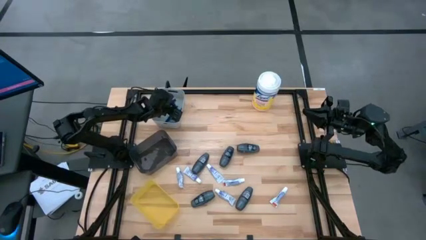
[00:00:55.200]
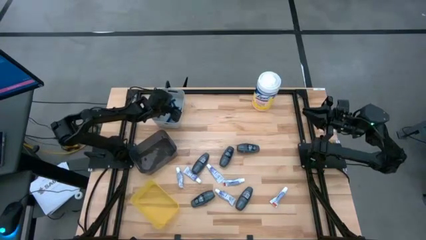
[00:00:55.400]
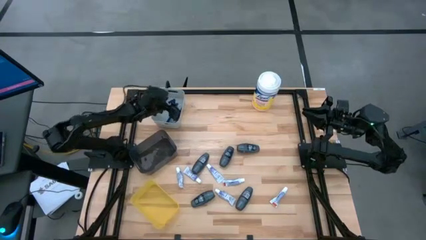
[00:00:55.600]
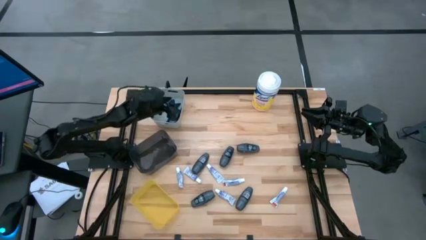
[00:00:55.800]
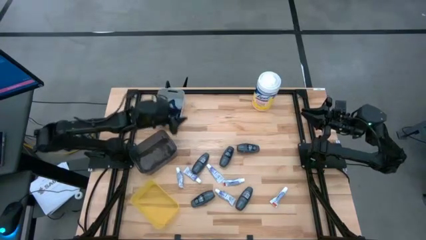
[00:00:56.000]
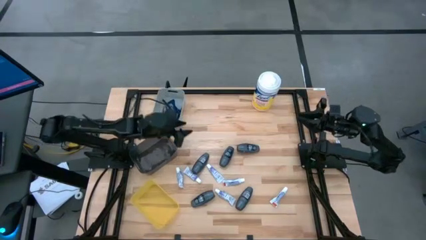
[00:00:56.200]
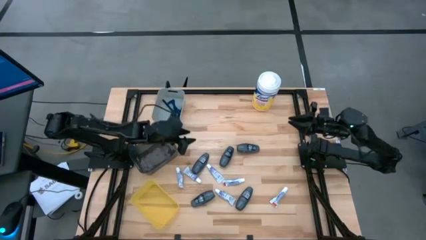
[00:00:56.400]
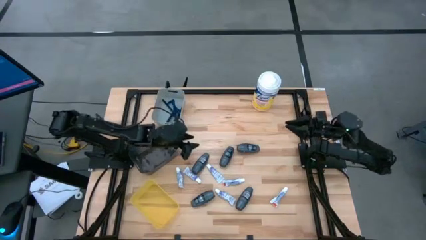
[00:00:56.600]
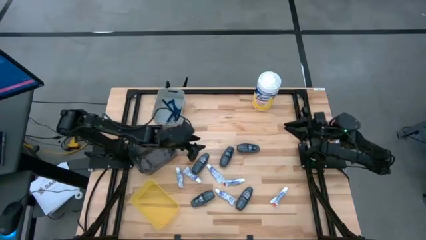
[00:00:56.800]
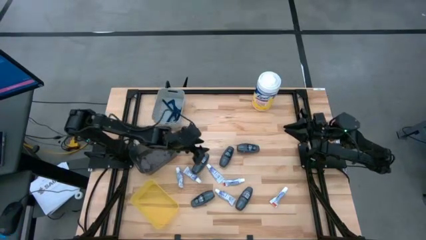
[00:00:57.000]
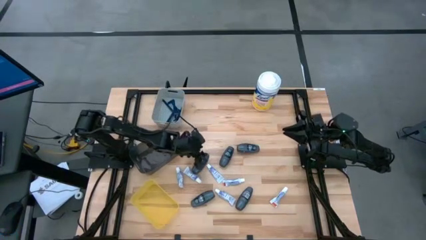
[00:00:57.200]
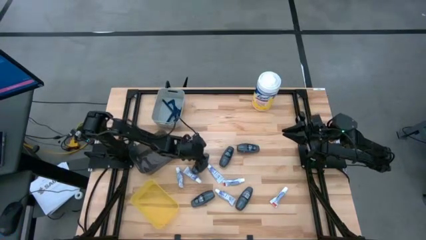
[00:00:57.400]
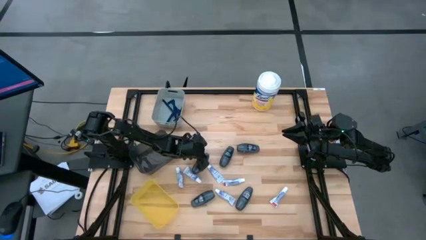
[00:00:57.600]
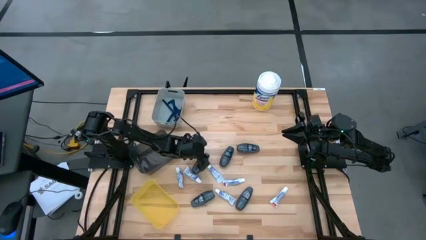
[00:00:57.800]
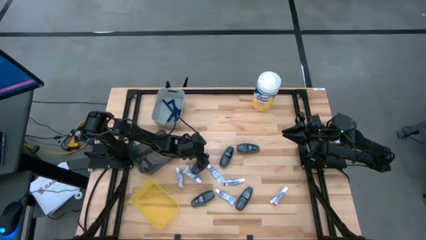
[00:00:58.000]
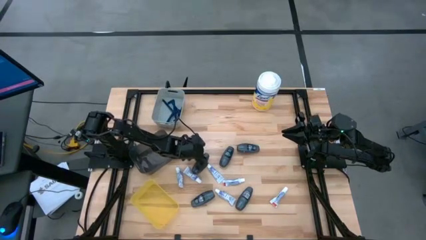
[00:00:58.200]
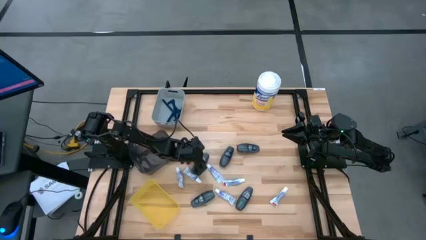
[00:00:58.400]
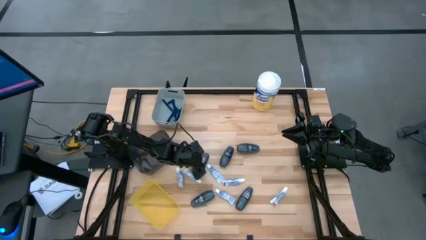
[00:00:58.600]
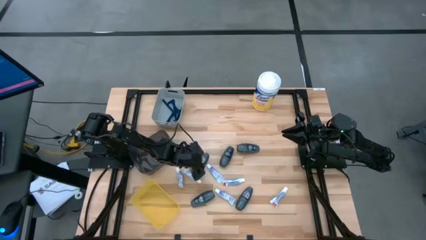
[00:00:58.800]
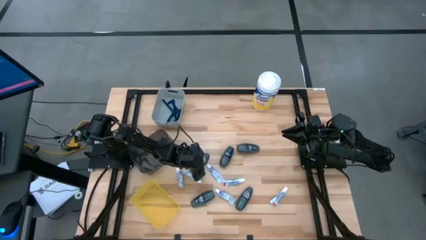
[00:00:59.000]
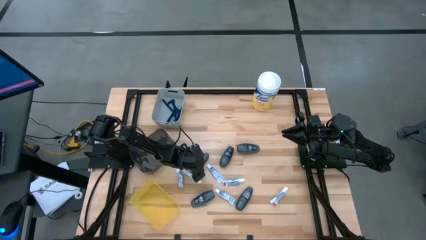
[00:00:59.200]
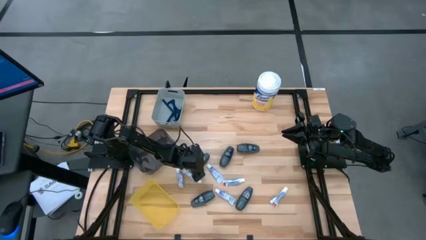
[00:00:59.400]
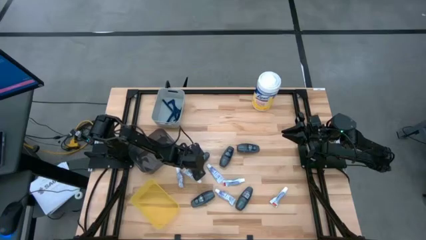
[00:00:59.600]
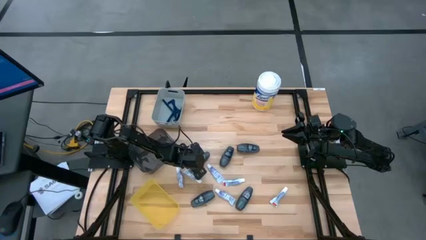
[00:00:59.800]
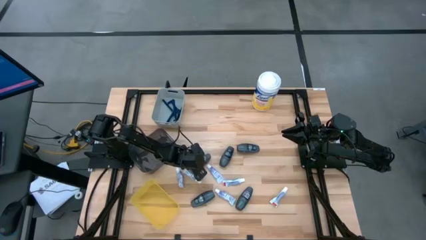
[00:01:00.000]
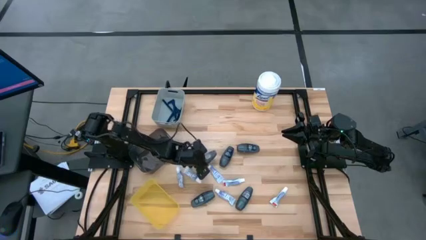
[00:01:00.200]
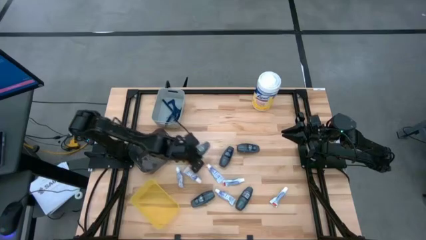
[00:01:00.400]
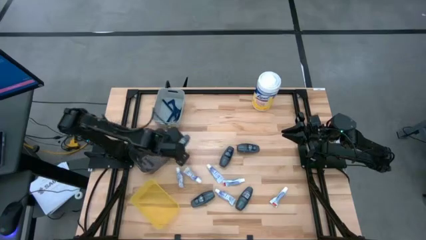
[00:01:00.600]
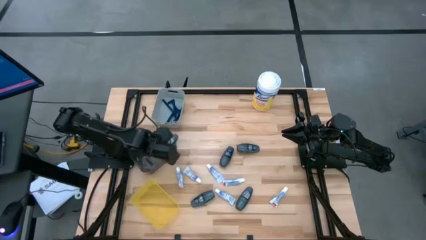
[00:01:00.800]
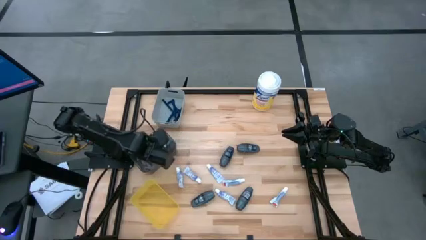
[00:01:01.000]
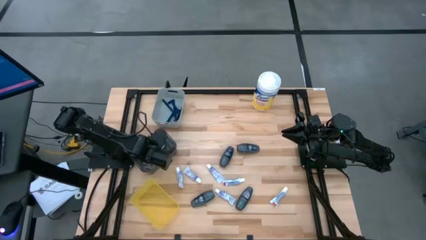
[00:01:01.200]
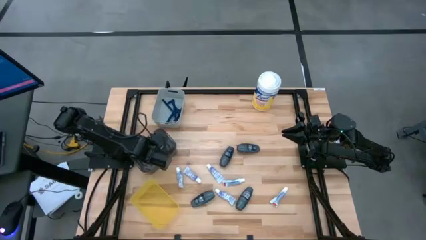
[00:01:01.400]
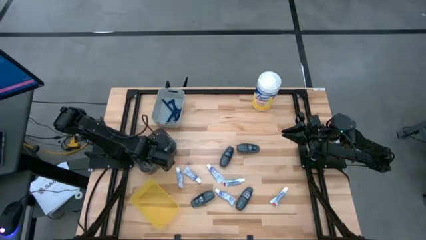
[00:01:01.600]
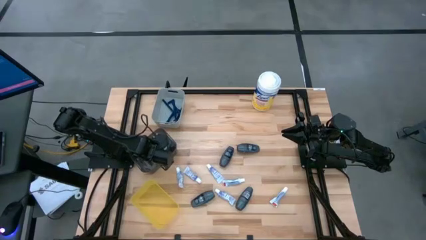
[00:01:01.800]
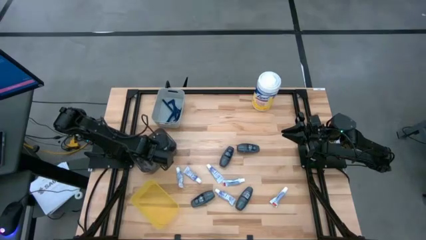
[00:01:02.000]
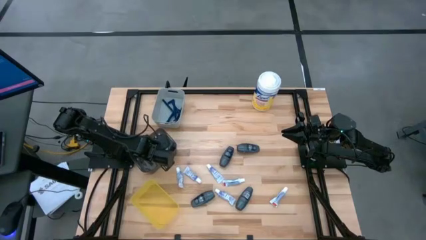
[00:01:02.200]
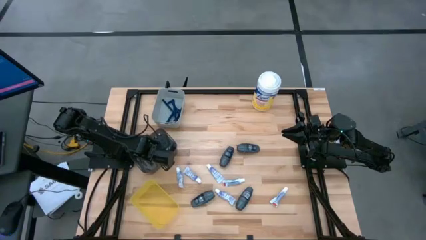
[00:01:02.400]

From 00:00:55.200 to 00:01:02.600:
Task: Pick & Place Travel size toiletries
Put the deodorant into the black bin

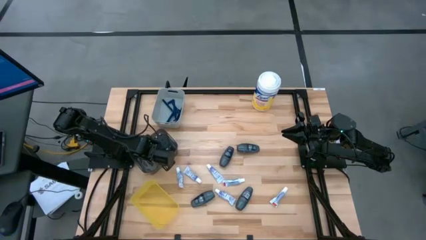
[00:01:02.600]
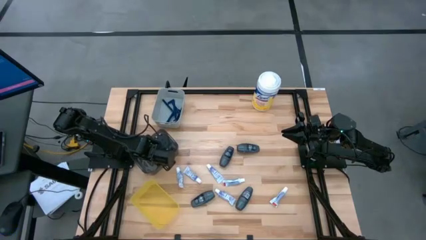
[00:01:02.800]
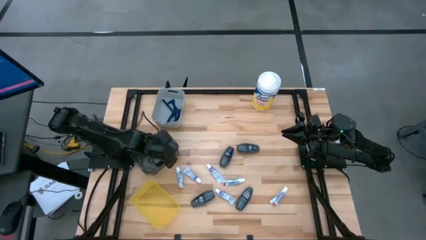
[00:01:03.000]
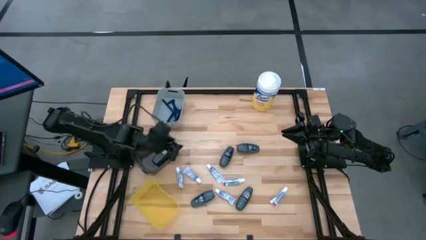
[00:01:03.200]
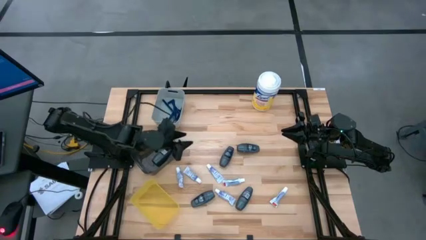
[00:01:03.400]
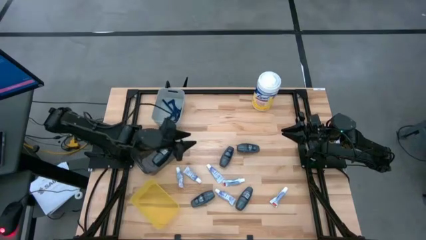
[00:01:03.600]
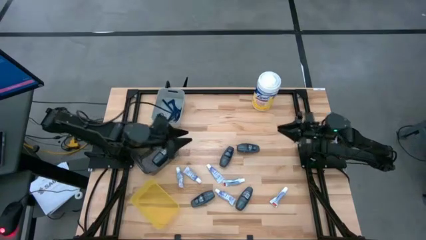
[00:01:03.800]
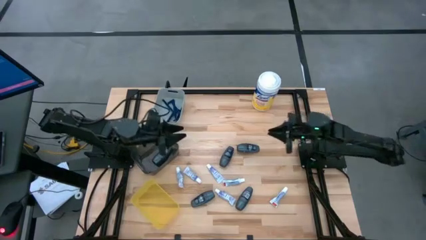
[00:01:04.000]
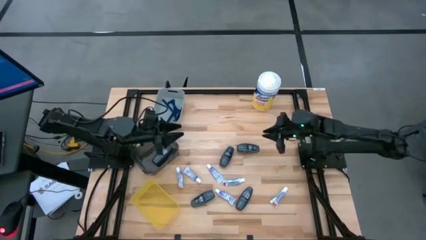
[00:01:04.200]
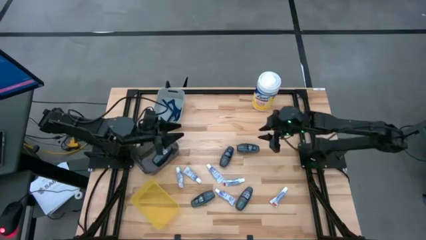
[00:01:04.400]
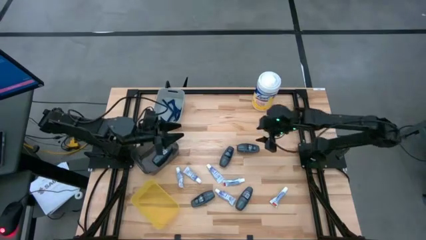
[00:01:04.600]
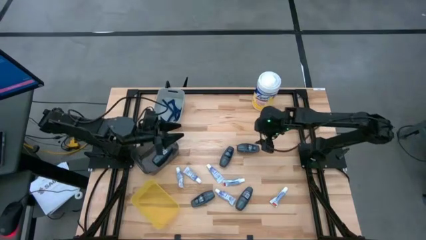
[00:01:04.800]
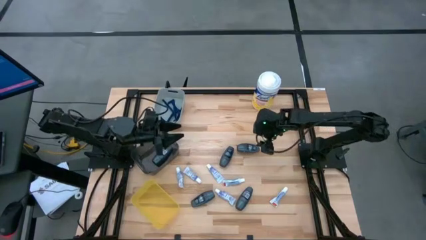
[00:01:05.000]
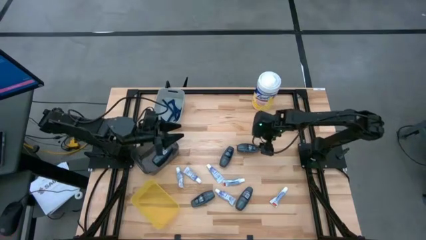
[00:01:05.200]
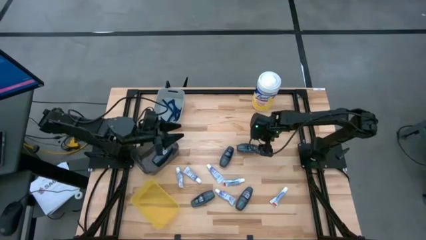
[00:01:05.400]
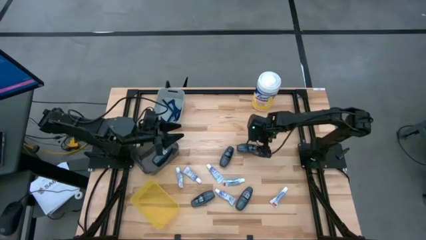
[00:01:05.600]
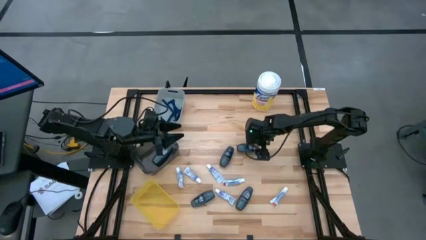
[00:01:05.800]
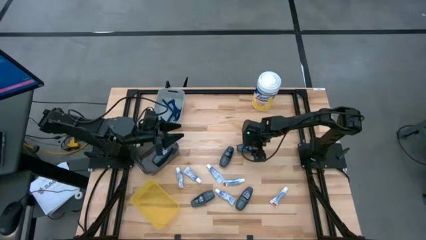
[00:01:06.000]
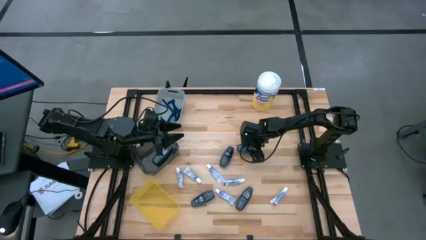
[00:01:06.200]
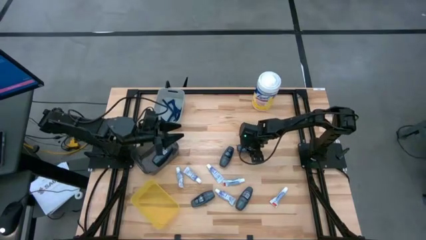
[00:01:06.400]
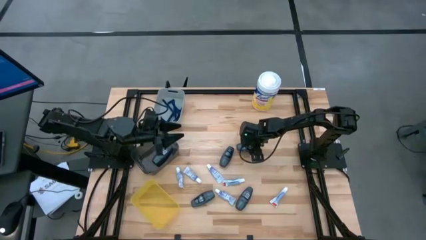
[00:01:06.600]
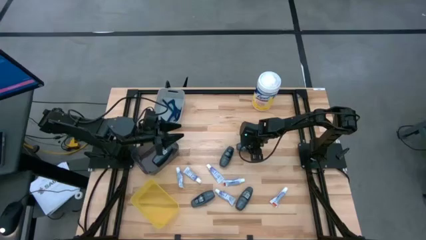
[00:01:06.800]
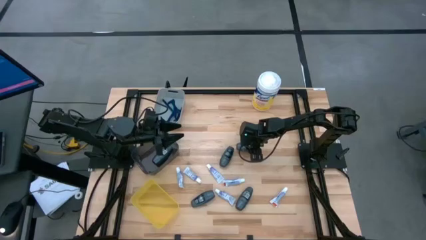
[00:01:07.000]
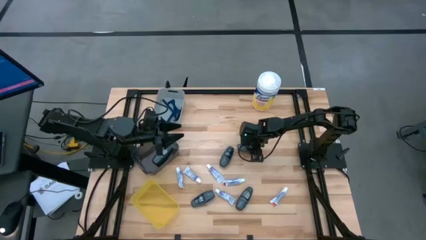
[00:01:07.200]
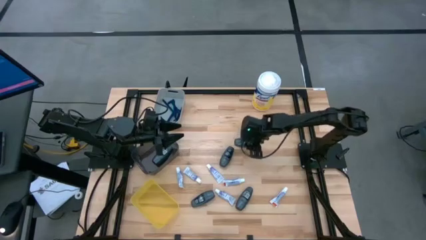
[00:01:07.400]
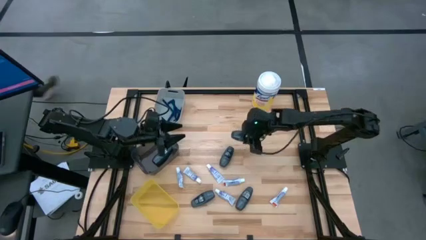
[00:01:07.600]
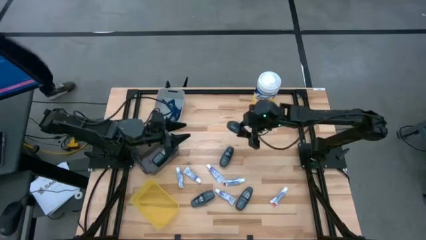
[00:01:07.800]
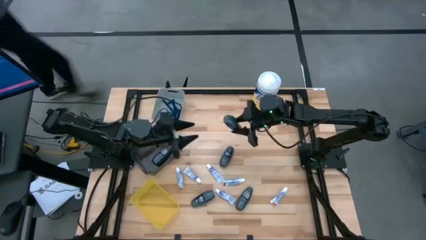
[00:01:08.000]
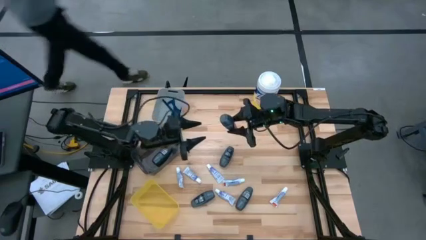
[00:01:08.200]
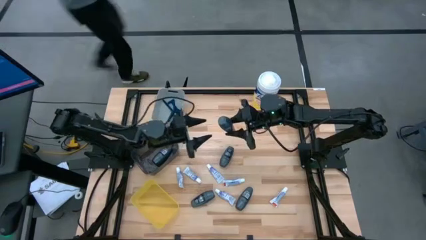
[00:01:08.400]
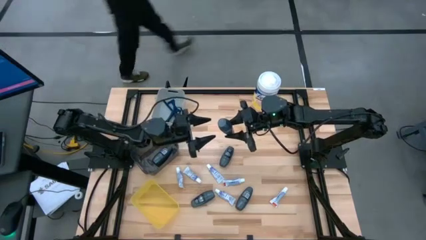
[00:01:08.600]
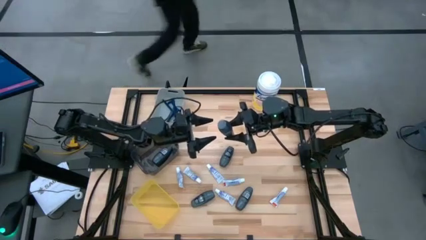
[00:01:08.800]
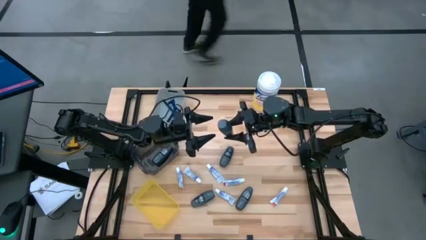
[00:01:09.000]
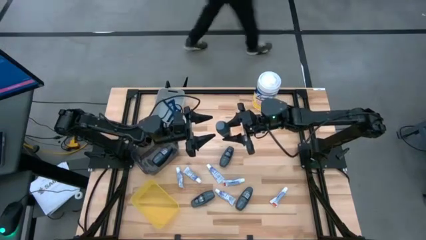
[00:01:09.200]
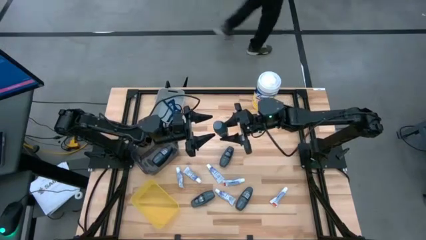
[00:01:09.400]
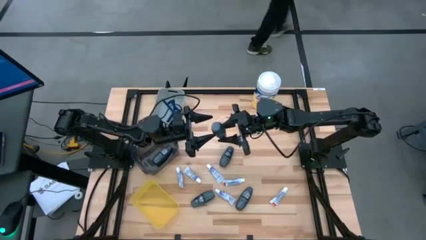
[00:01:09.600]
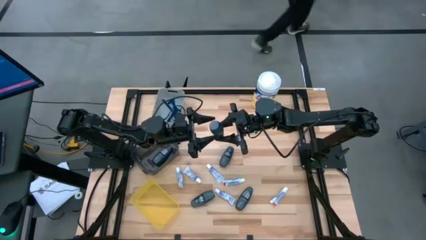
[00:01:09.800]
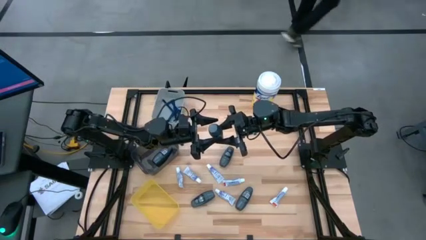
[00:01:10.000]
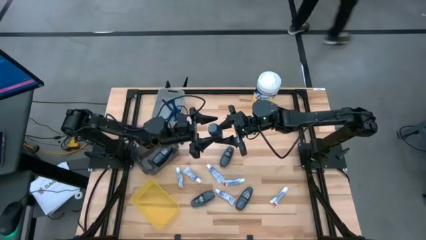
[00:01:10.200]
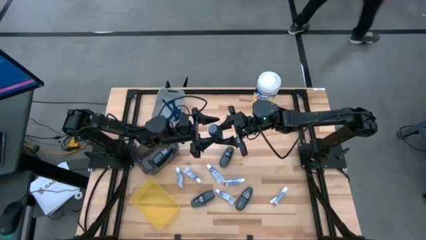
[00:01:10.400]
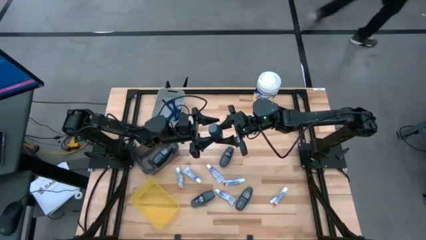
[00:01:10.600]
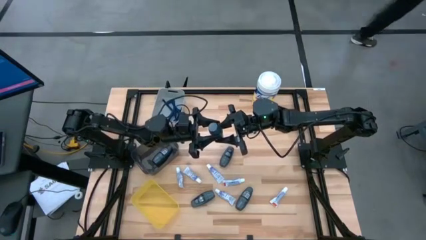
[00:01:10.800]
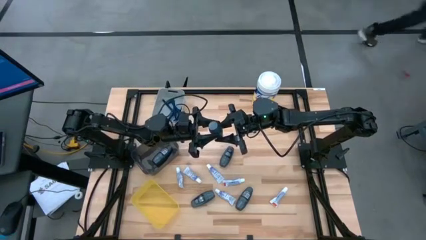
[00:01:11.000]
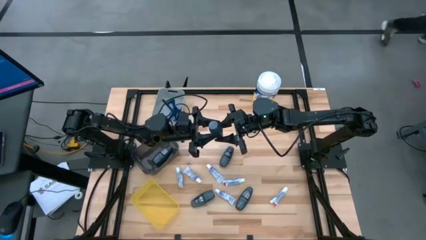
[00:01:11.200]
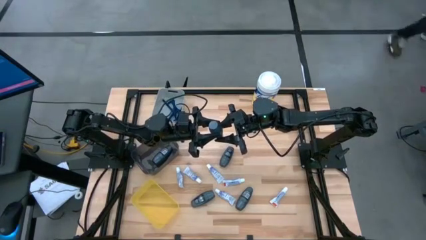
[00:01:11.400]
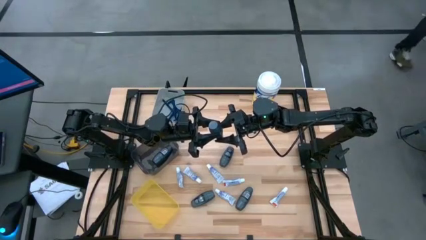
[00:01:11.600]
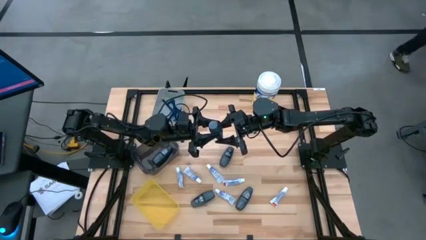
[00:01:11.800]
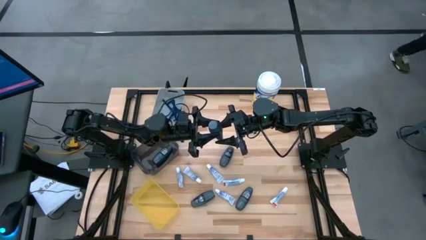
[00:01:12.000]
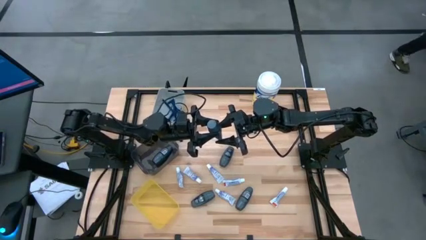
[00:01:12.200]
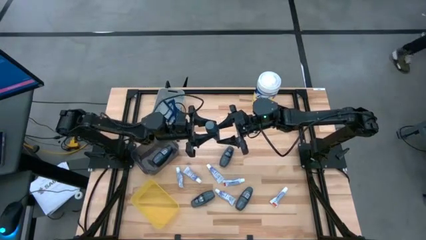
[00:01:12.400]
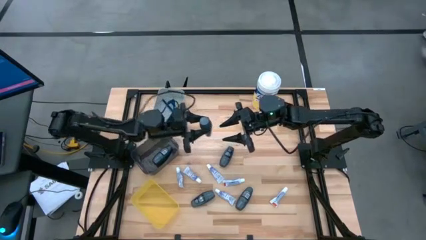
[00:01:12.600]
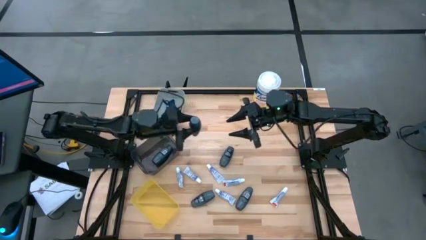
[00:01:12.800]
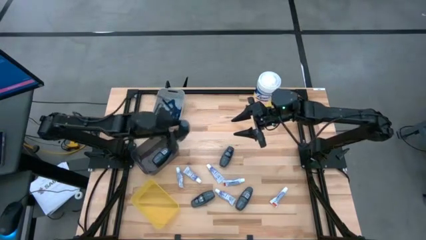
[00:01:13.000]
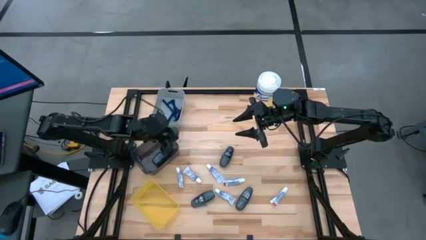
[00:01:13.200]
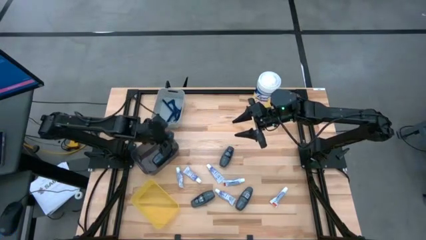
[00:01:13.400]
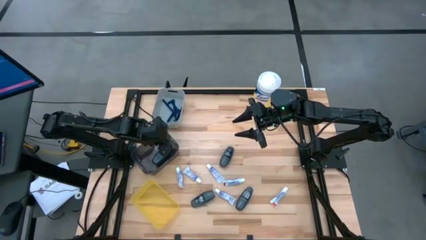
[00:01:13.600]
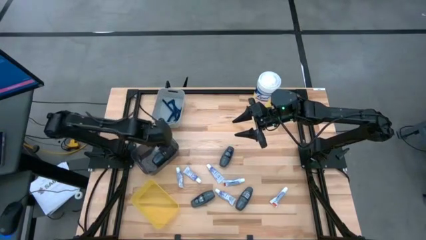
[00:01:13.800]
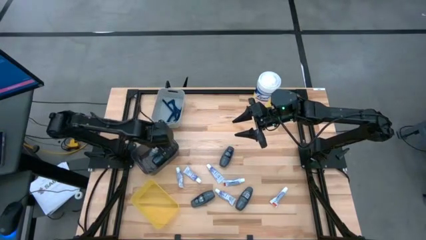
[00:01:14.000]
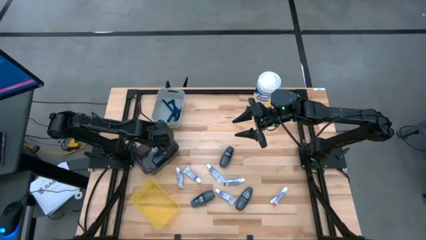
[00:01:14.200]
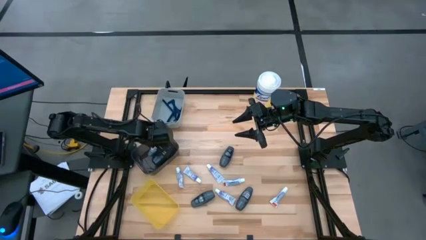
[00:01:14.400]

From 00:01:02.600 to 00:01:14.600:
Put the deodorant into the black bin
